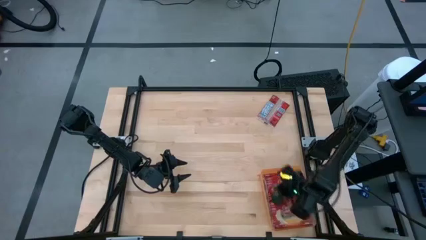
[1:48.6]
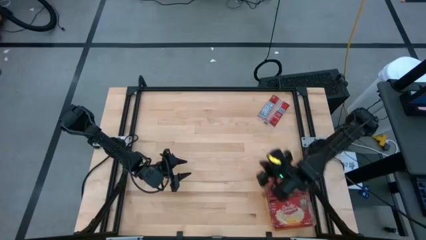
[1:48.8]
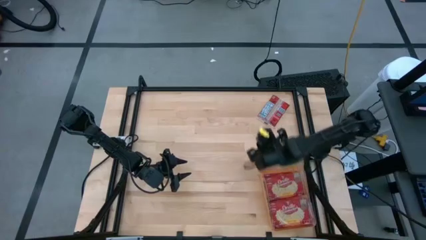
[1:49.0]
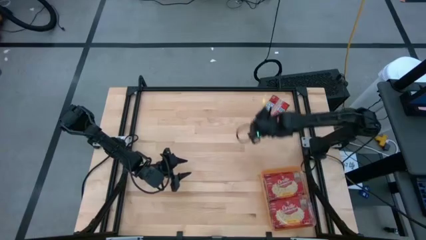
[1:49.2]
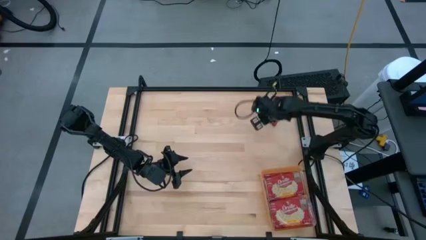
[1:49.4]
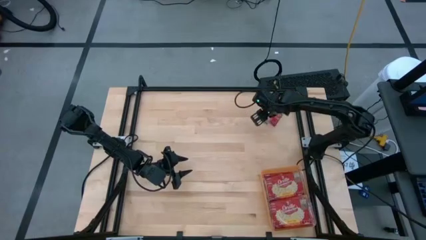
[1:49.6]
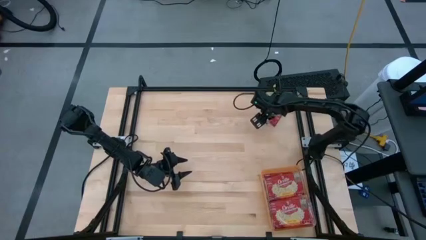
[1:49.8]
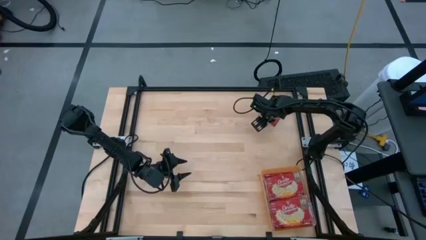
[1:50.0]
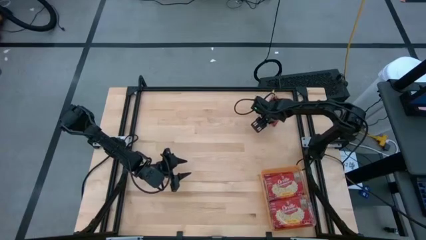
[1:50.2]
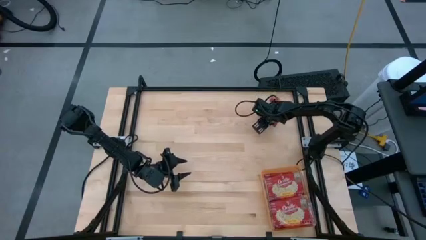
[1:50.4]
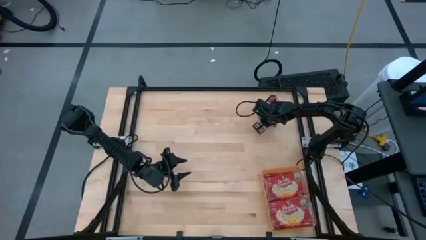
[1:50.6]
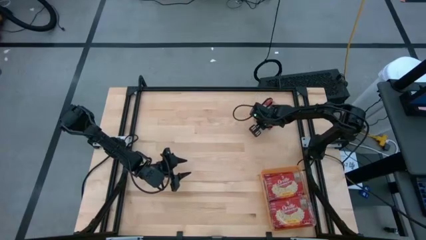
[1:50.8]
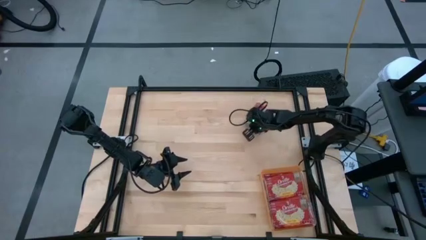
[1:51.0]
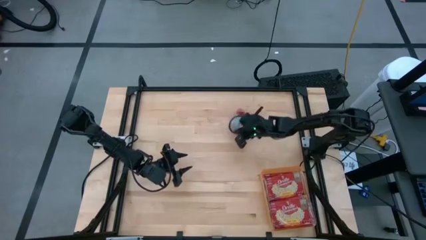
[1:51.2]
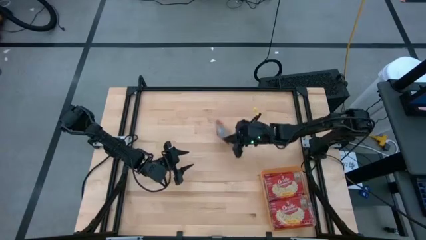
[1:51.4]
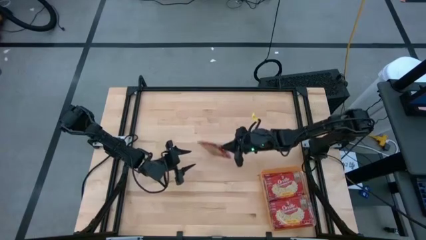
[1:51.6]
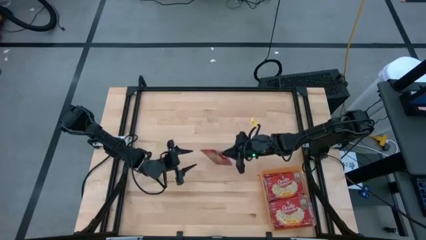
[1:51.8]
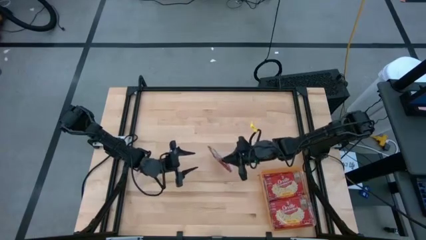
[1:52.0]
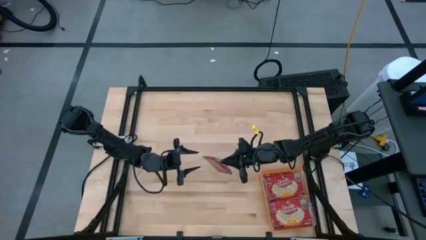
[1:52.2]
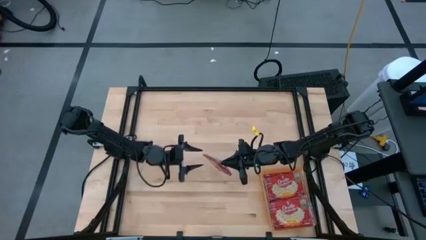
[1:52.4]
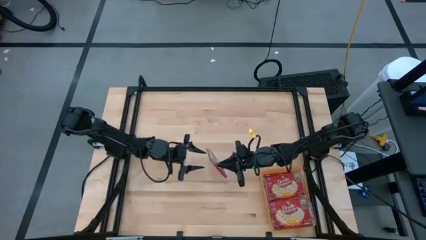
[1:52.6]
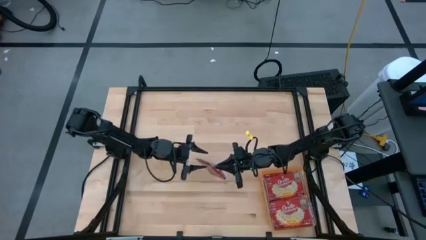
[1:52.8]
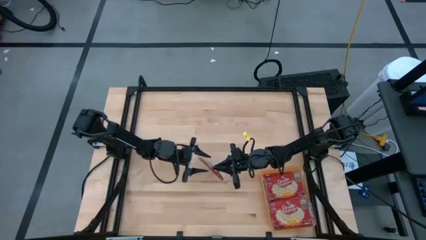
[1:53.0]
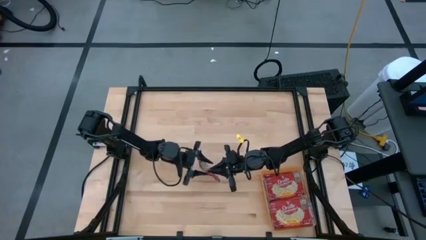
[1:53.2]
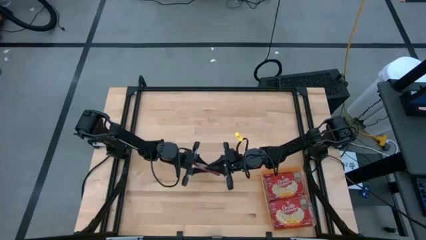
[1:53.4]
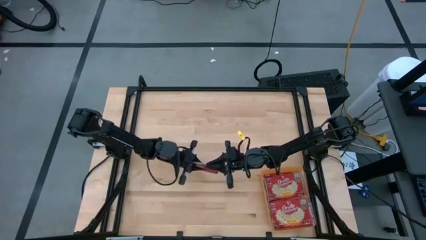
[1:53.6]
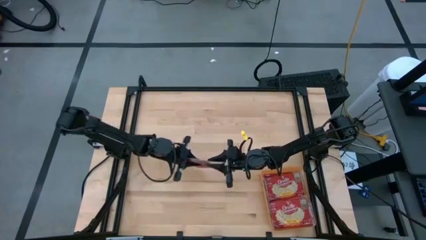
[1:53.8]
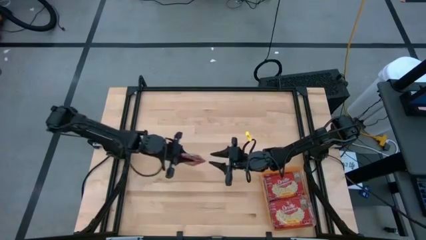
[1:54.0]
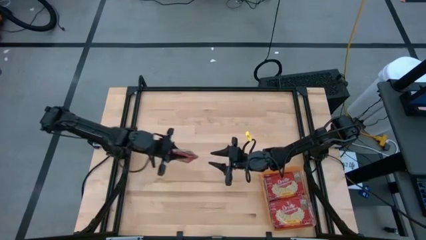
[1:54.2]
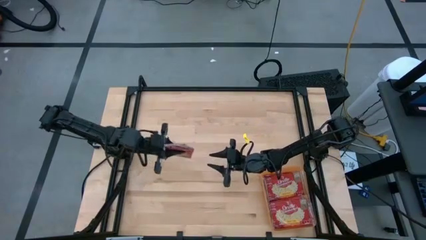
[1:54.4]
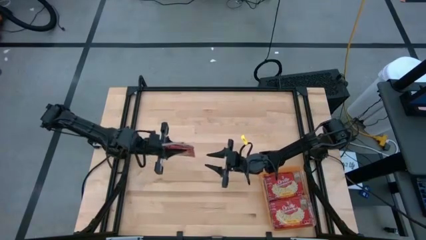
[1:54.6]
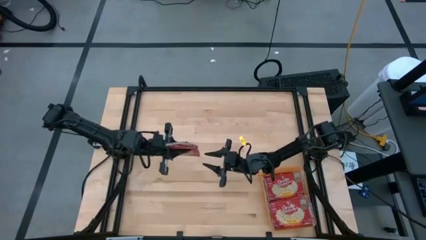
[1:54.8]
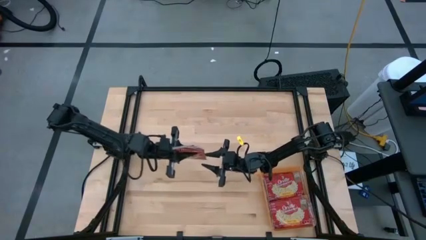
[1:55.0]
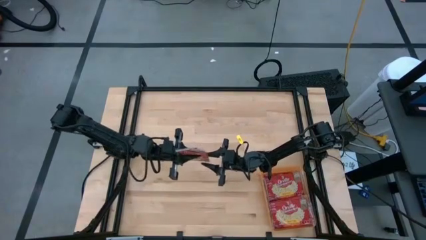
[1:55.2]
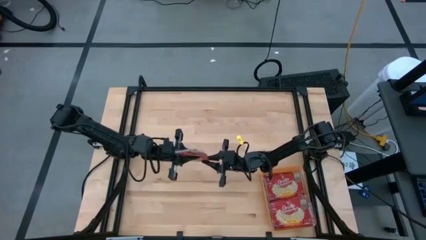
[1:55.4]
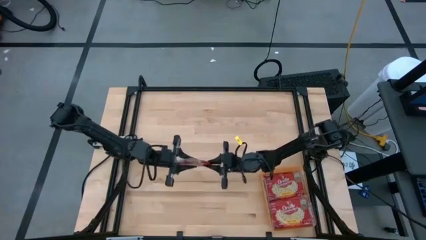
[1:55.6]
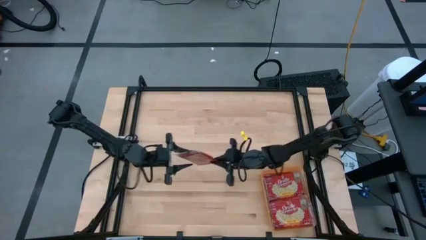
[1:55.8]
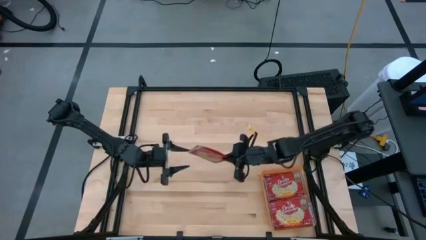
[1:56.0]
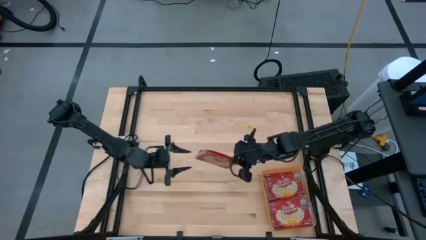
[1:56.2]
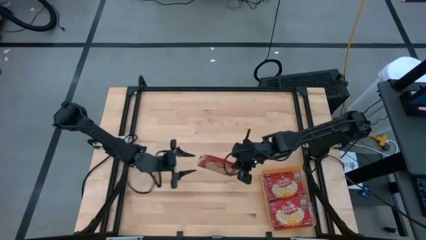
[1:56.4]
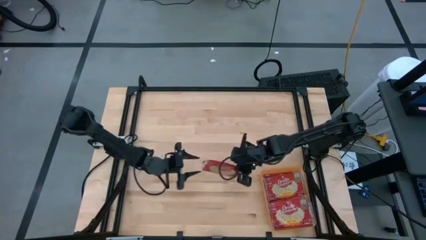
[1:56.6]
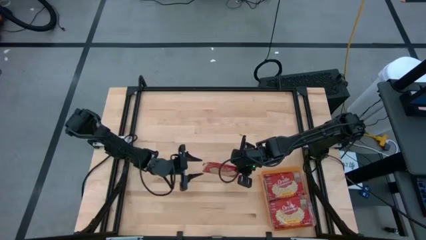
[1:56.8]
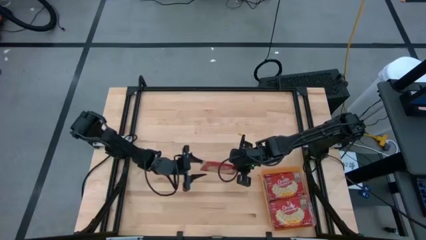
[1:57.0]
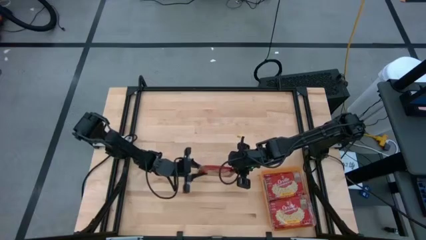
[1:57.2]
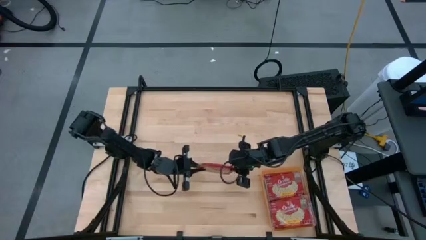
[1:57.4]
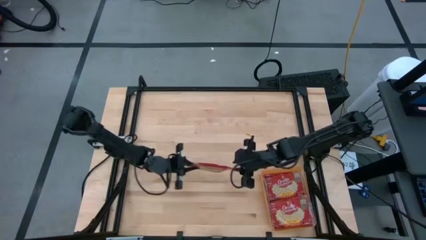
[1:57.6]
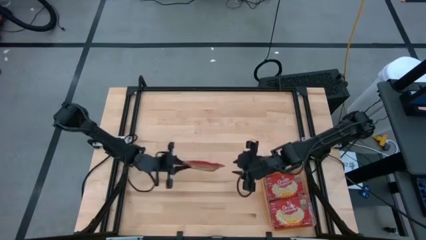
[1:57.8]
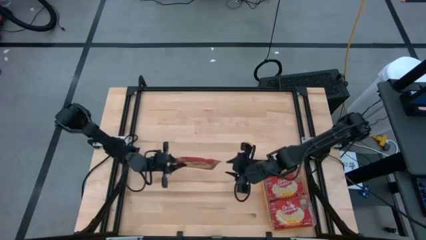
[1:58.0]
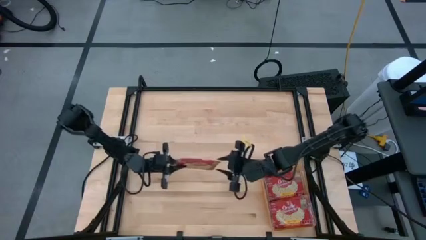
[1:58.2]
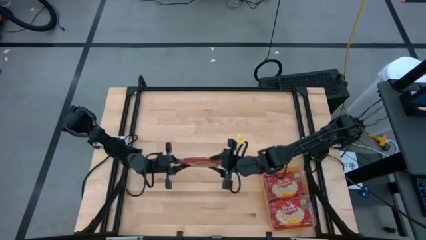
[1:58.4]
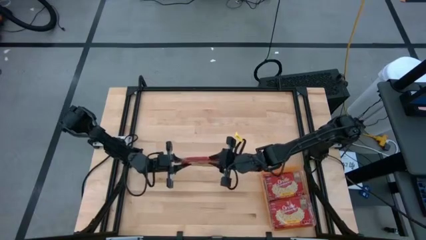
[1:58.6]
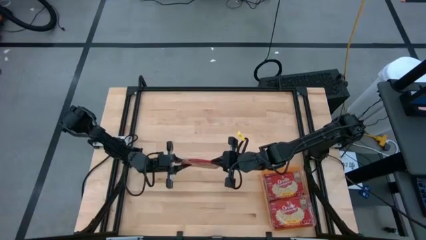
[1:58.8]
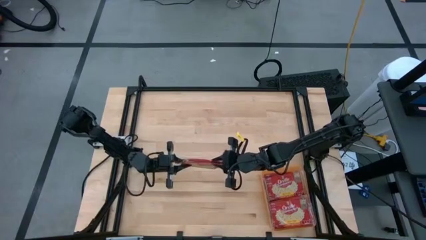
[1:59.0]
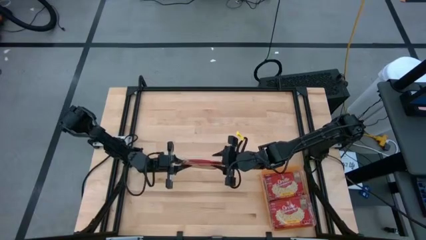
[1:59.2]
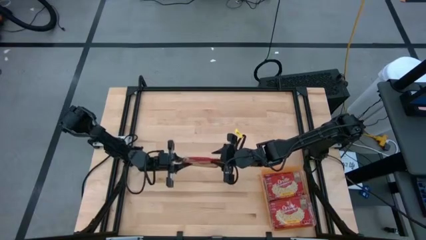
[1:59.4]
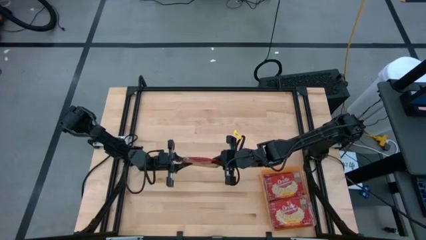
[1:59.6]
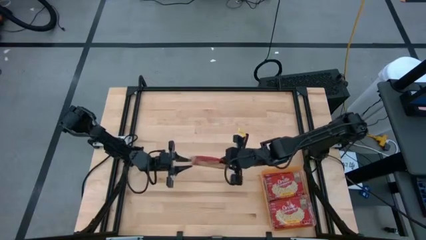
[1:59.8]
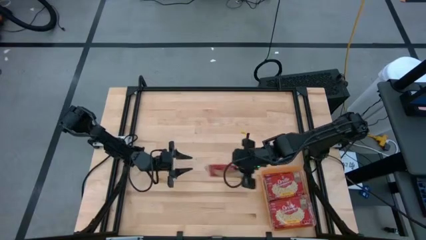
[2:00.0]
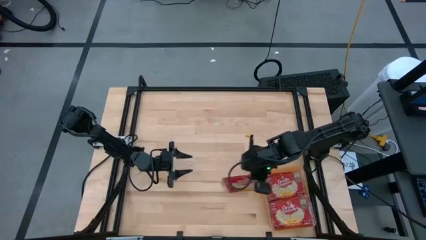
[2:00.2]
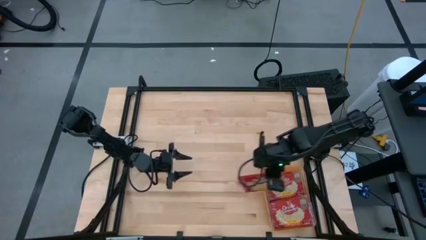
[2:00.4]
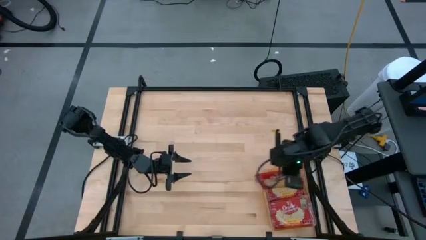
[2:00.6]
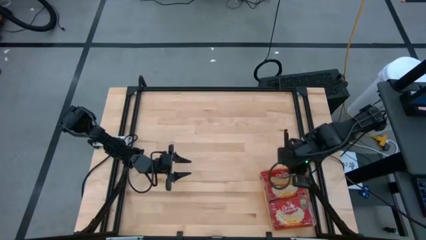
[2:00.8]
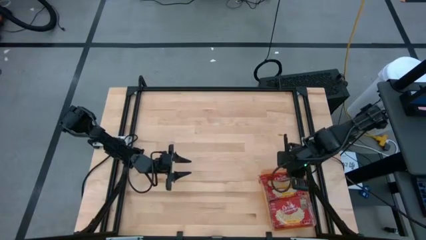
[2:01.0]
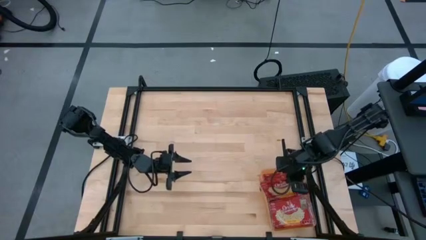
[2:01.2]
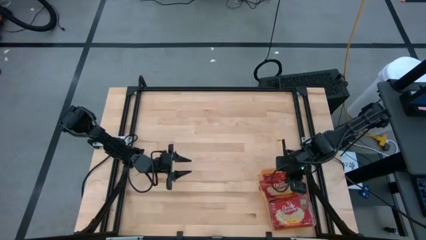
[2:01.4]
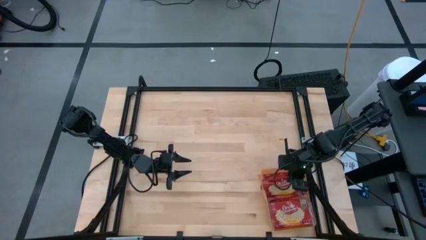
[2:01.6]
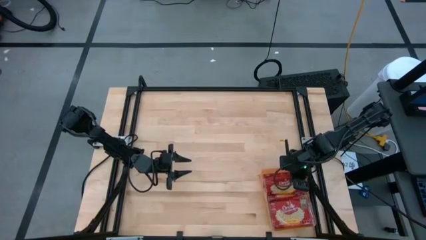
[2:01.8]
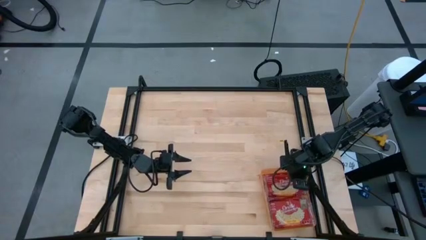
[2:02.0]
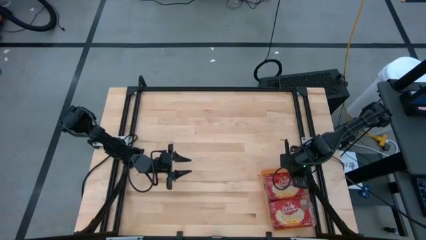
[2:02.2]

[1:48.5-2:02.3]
Task: Sort popcorn bags into baskets
Put the popcorn pack into the orange bin

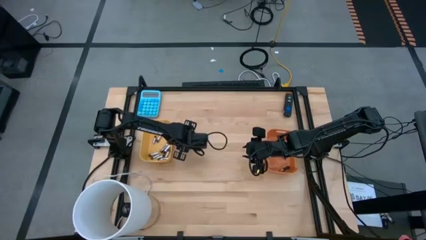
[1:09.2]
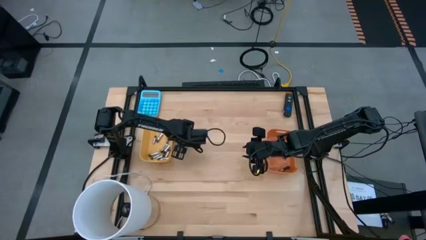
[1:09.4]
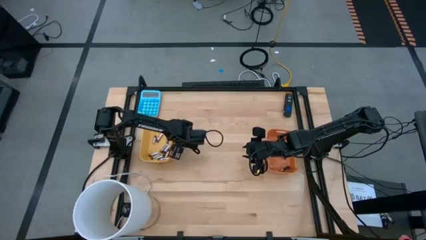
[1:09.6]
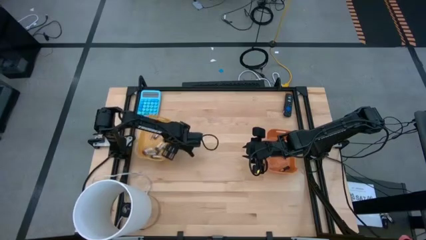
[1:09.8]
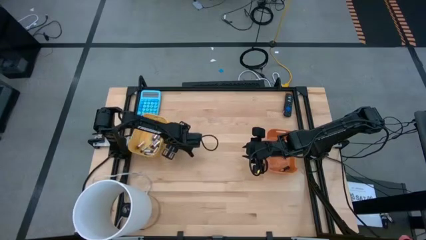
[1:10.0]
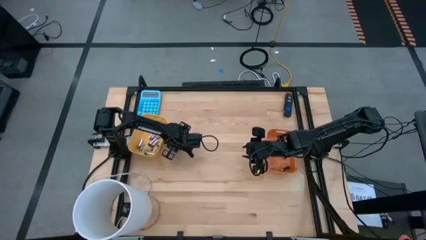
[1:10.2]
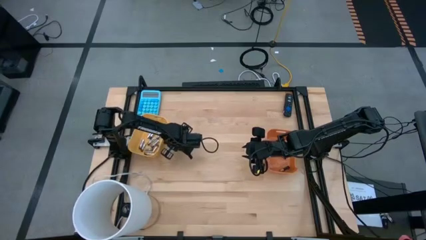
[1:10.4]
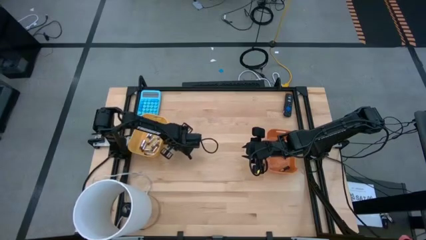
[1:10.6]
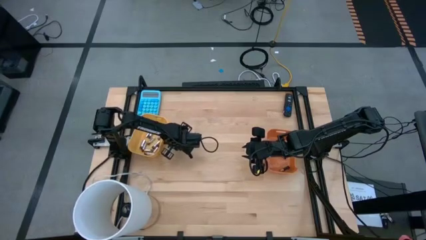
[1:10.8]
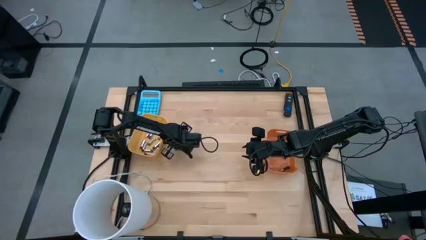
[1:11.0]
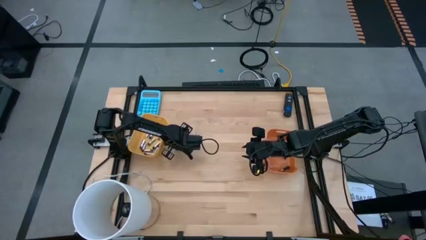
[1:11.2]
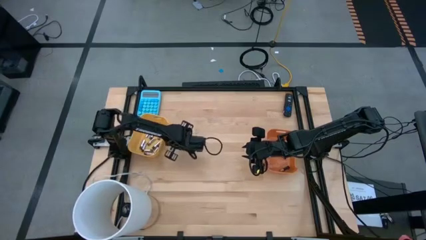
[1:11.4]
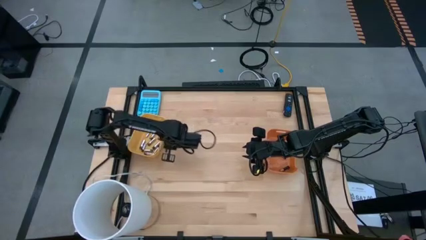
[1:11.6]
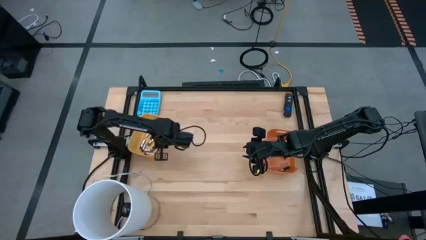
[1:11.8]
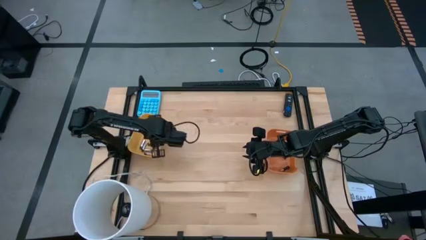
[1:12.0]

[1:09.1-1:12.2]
Task: Sort batteries
Put the silver battery into the yellow bin

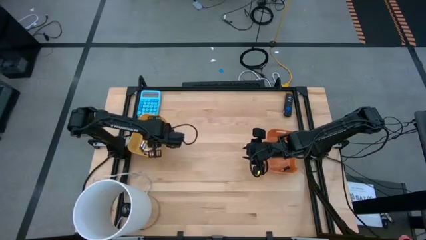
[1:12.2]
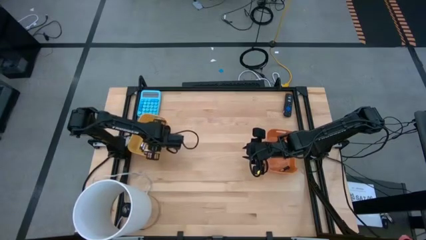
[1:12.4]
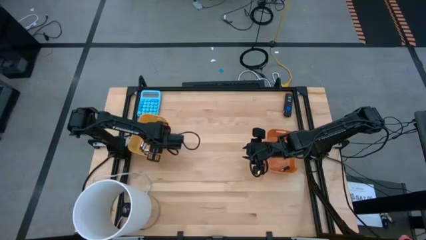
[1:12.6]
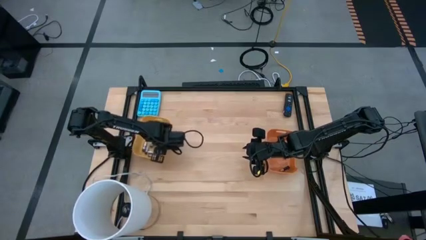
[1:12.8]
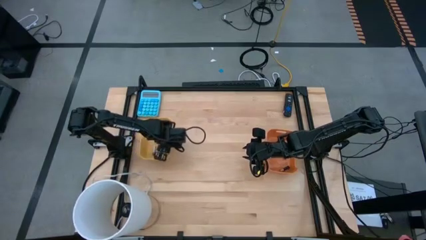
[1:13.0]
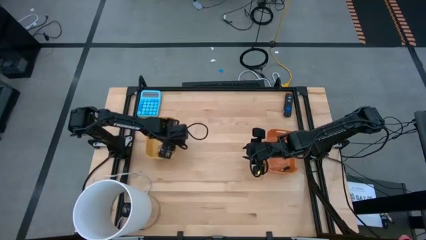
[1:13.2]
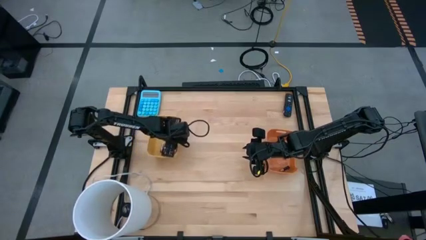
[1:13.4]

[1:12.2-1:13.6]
Adjust the yellow bin
